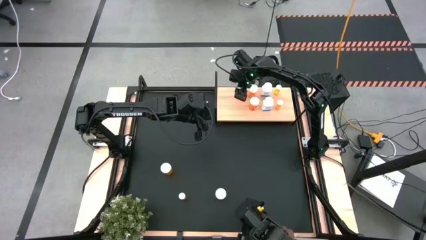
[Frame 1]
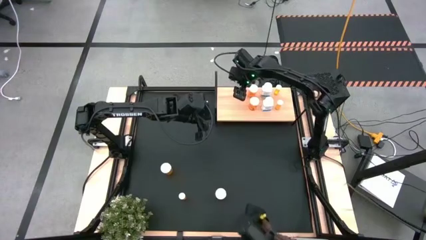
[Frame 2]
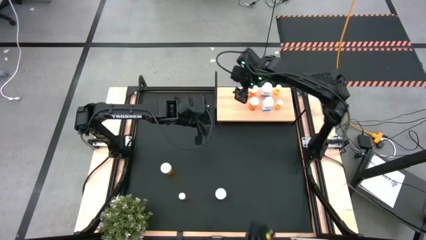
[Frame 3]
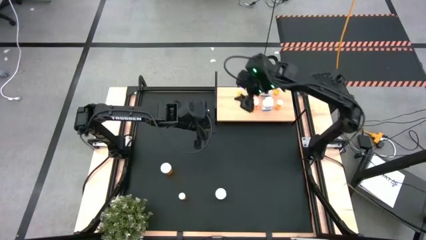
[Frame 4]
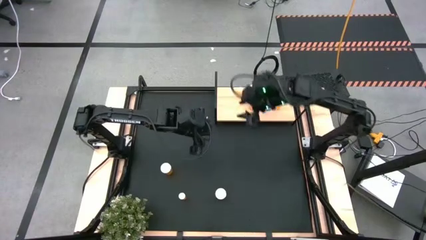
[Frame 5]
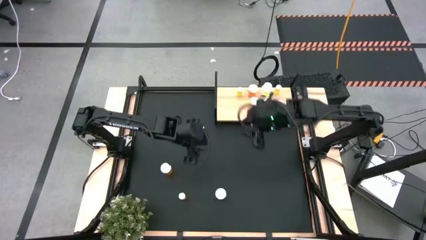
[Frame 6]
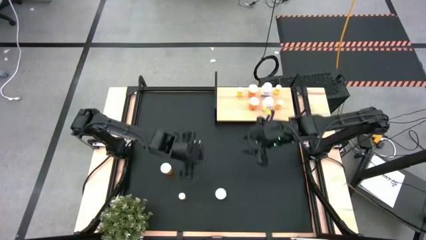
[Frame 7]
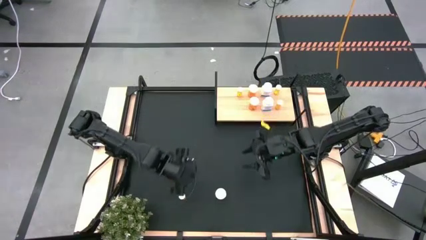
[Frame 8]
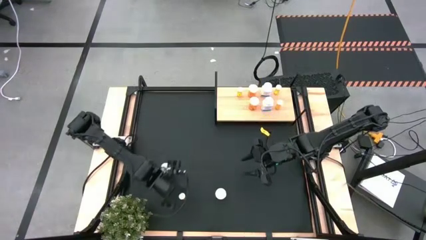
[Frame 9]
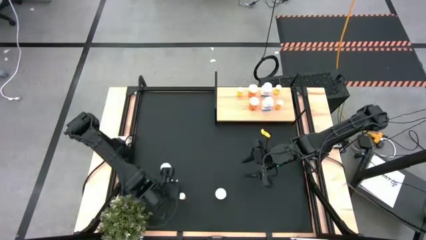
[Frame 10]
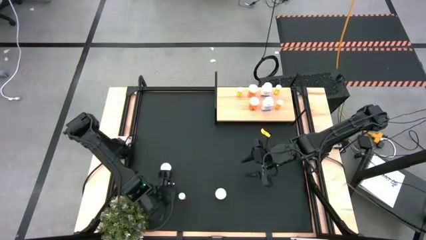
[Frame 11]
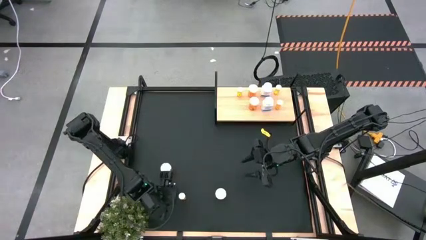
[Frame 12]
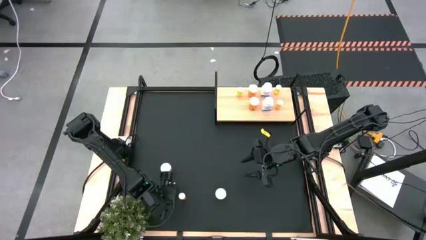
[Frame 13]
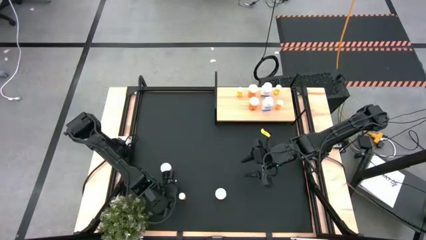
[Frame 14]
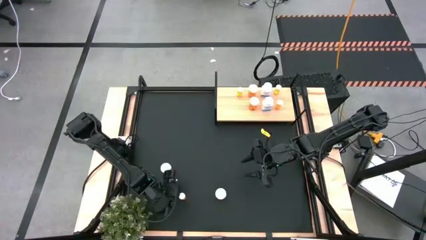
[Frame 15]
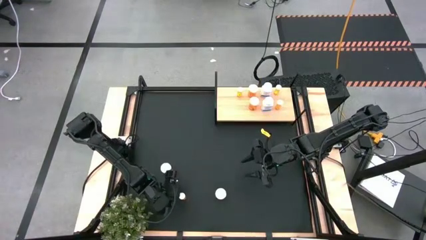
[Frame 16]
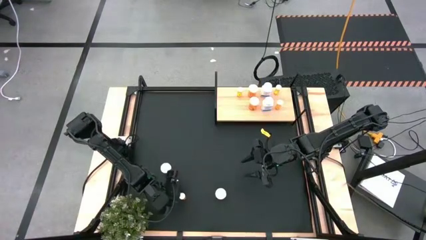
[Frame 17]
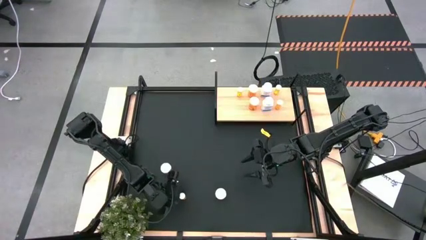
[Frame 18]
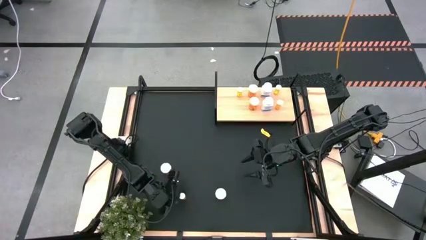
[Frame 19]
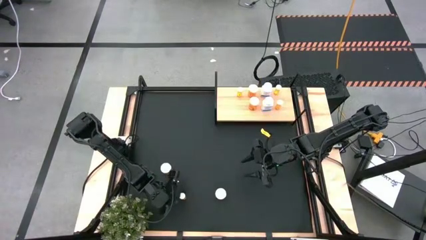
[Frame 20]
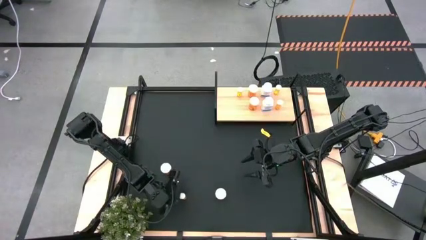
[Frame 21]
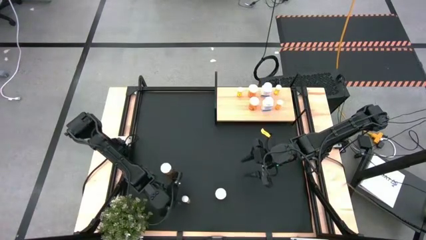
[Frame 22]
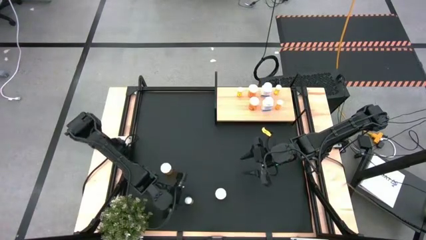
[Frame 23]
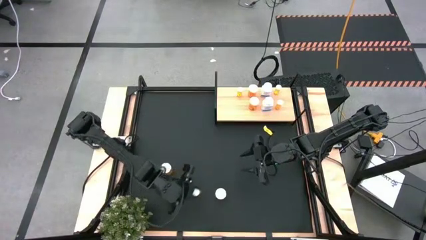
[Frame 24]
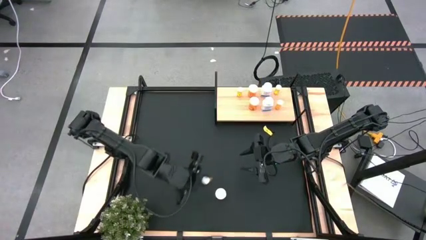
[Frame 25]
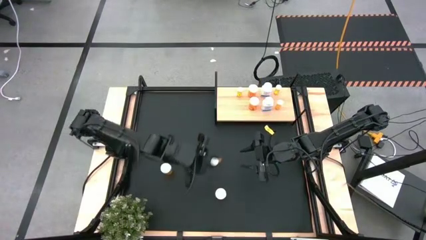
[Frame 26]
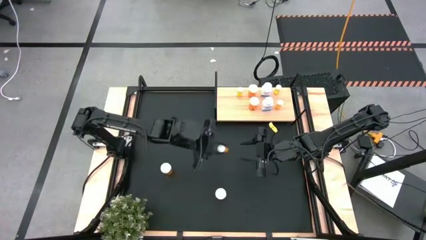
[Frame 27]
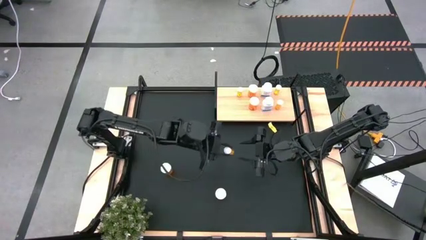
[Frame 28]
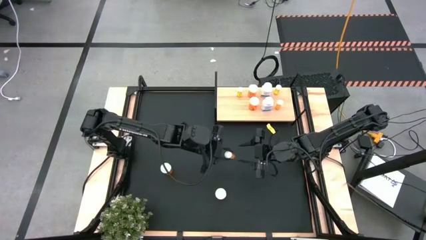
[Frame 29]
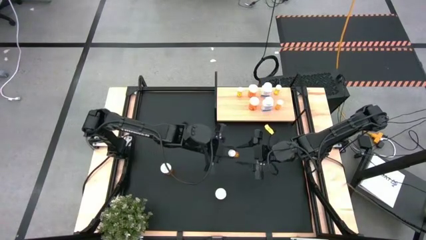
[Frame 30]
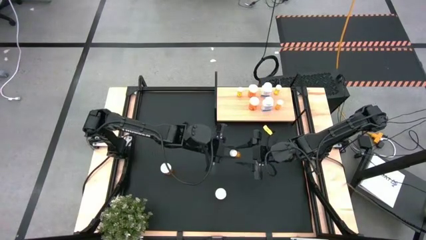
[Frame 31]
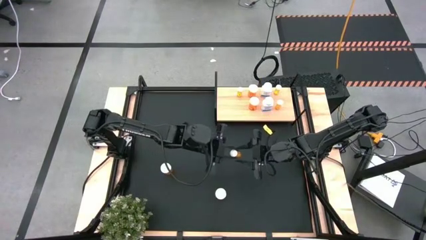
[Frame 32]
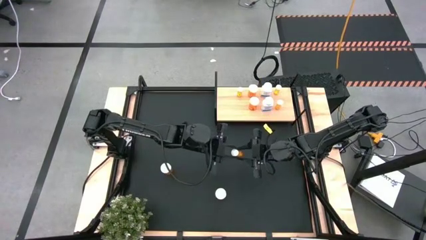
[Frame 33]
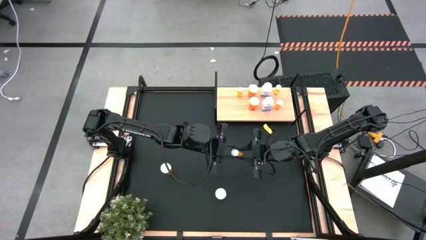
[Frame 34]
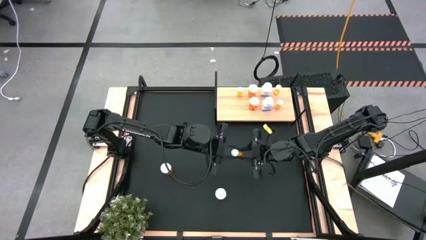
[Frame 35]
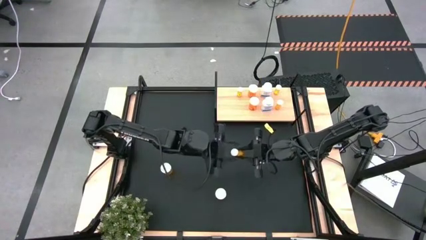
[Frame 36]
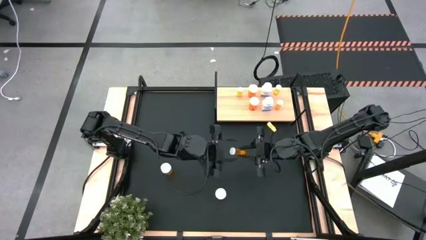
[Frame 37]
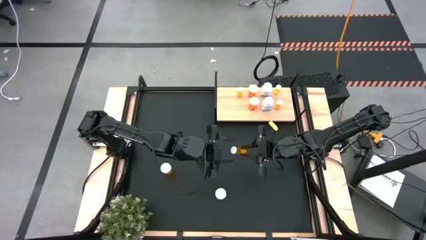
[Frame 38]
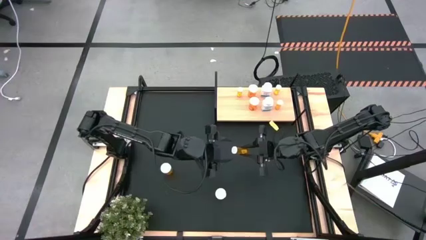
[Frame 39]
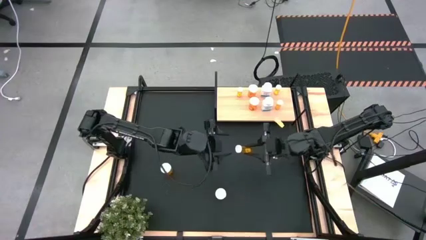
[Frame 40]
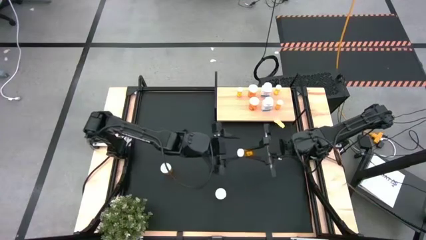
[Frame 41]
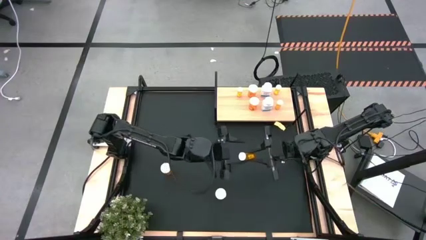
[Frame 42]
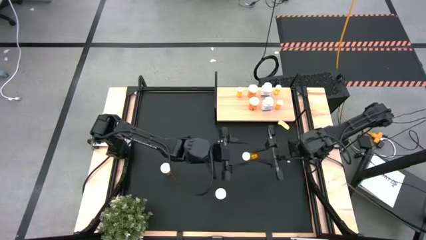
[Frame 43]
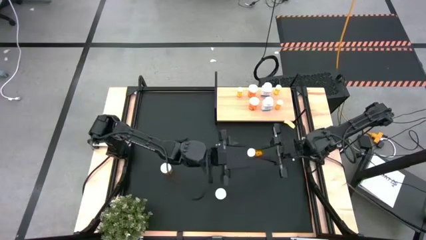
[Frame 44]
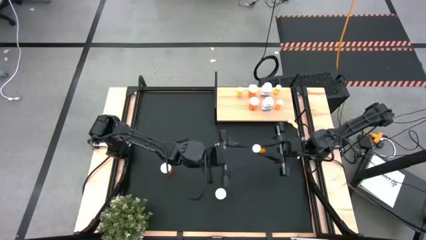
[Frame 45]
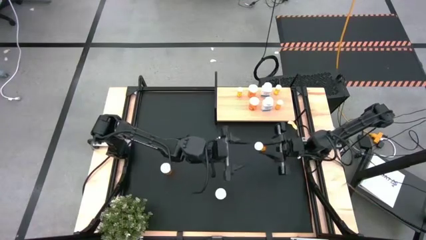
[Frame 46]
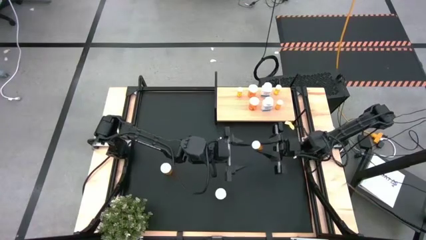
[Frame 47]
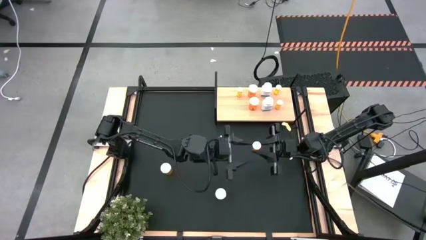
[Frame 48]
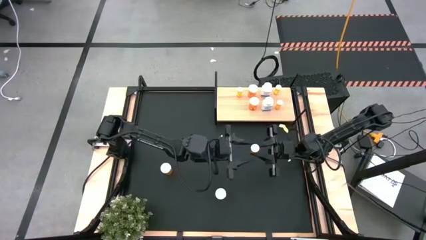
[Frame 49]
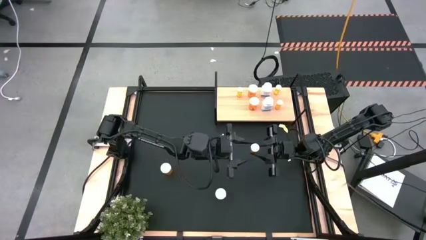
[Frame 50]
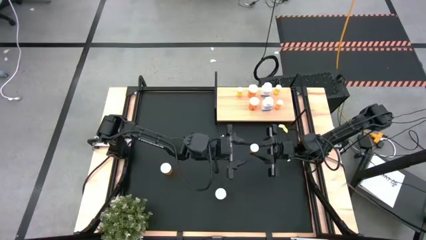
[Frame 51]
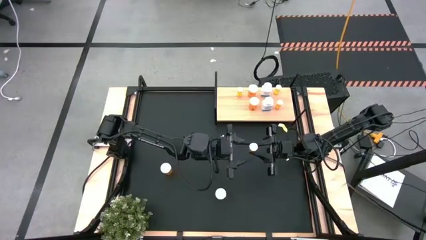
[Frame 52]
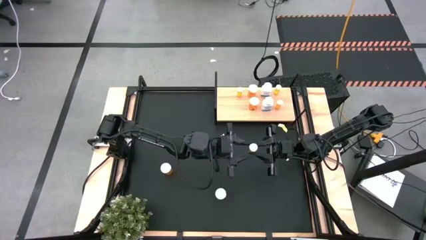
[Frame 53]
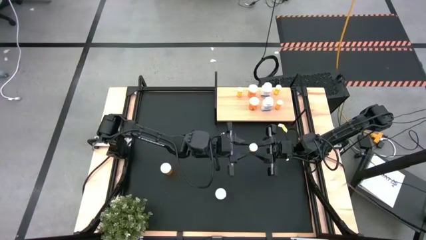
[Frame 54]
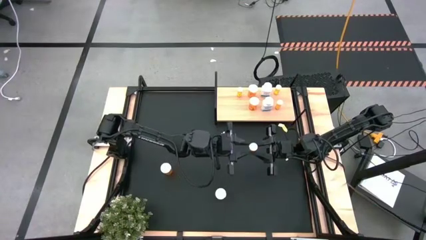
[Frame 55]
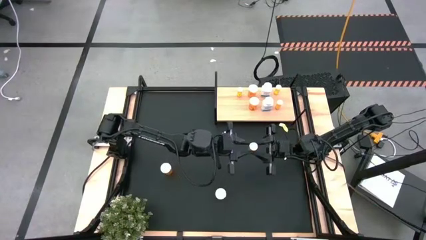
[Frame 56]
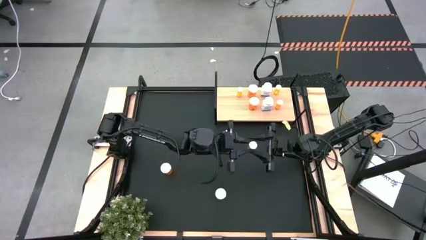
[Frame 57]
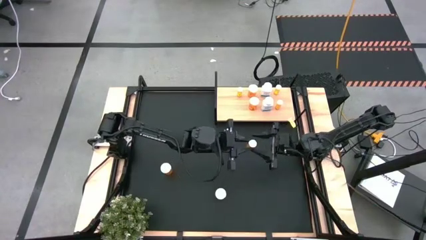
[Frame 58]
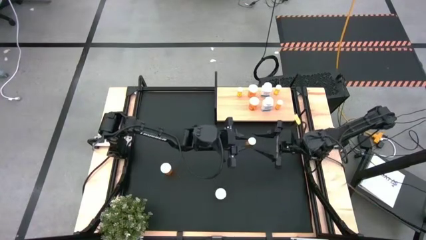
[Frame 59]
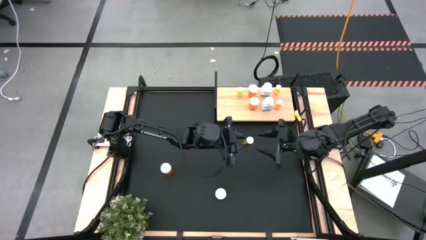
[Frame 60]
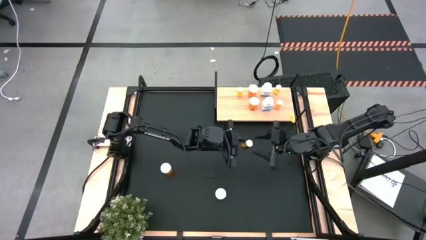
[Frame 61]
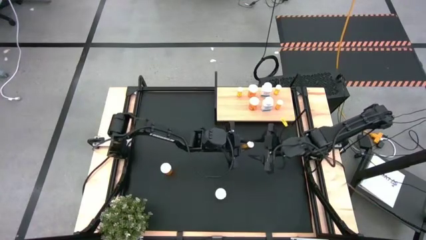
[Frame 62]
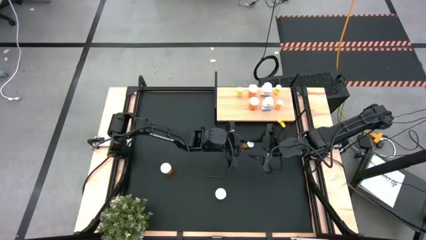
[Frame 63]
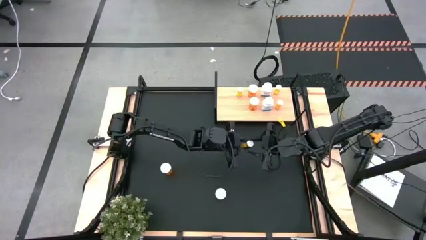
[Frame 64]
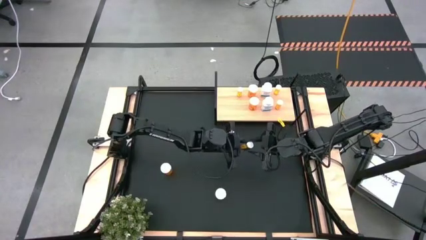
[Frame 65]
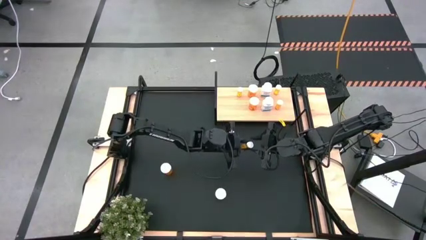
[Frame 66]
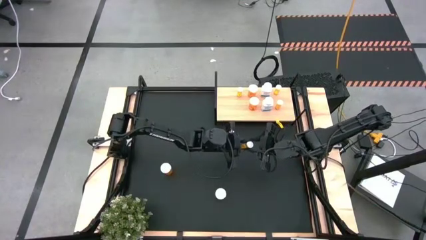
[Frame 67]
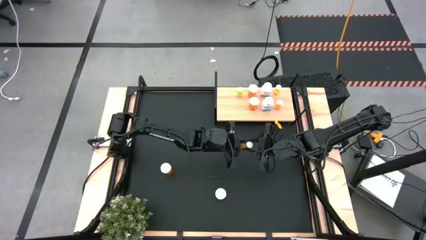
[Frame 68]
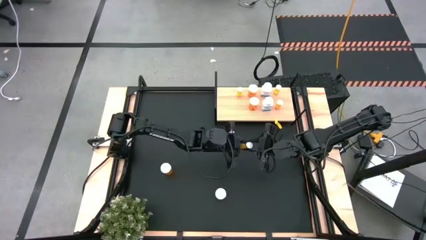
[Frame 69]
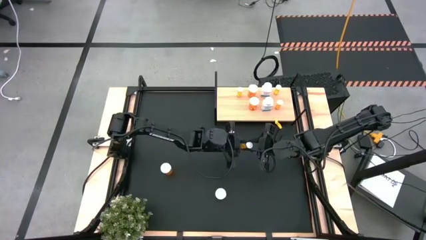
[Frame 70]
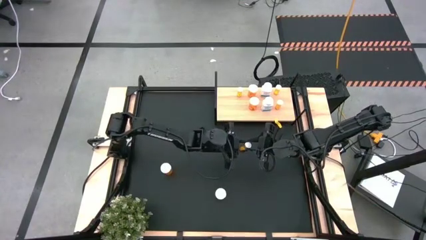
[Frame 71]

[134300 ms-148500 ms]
Task: Pick and place medicine bottles onto shelf by color
Put the small orange pill bottle on the shelf aligned with the other small orange pill bottle

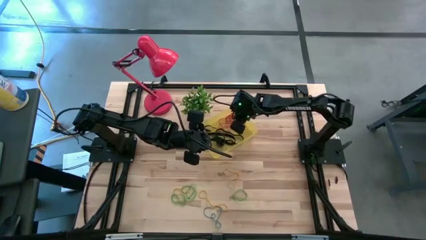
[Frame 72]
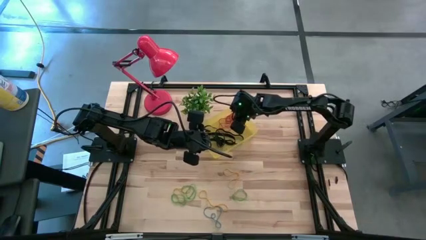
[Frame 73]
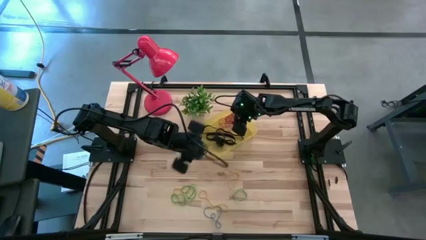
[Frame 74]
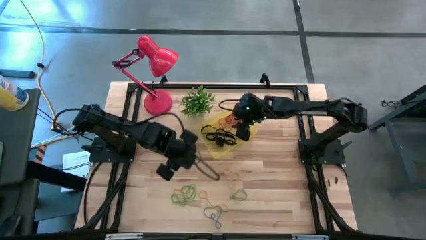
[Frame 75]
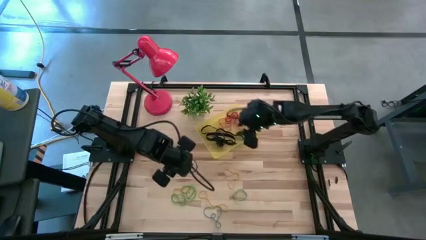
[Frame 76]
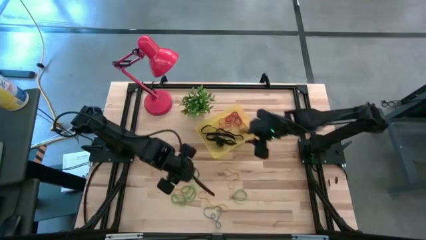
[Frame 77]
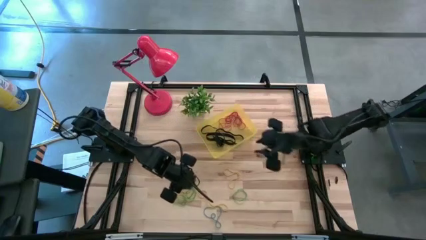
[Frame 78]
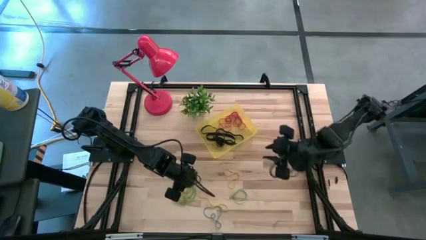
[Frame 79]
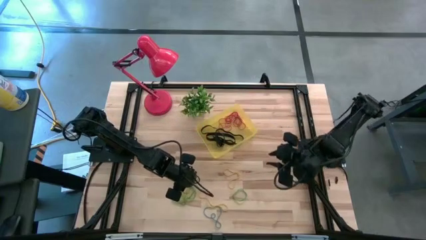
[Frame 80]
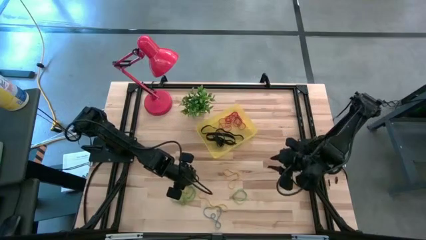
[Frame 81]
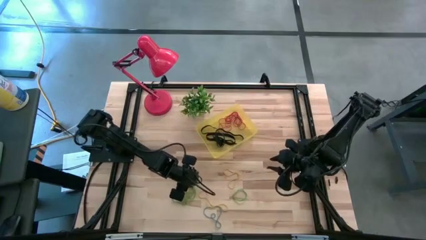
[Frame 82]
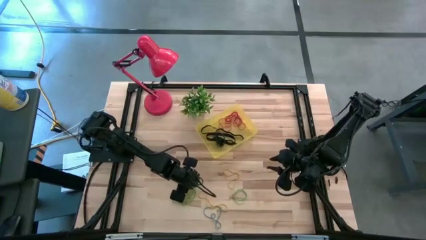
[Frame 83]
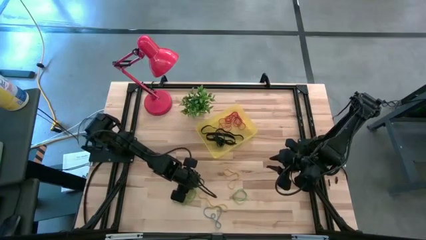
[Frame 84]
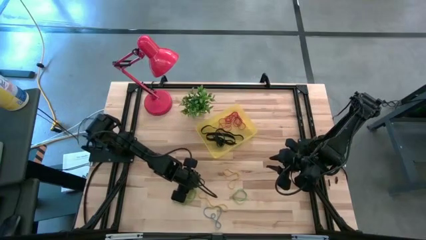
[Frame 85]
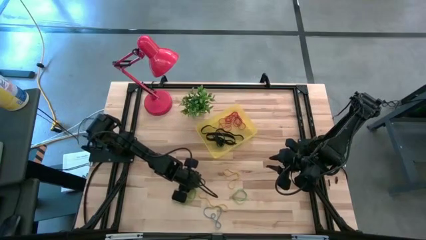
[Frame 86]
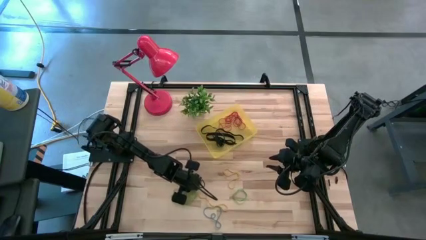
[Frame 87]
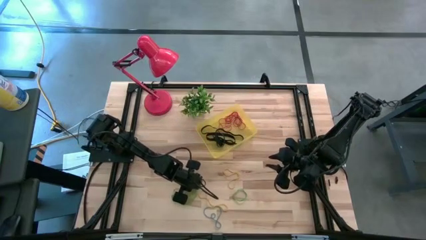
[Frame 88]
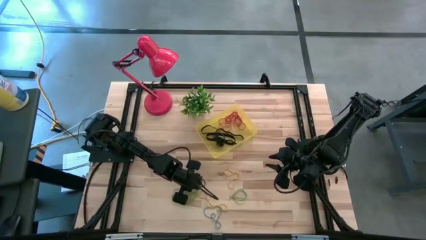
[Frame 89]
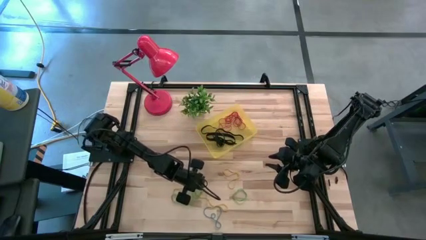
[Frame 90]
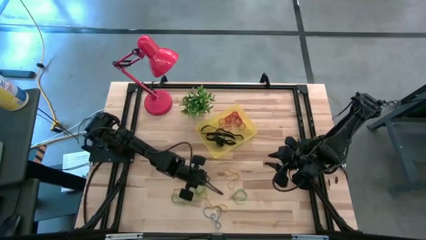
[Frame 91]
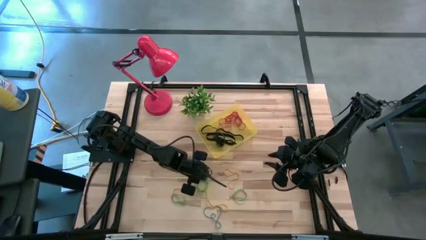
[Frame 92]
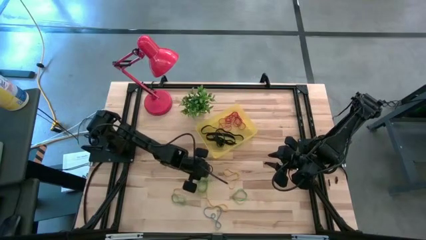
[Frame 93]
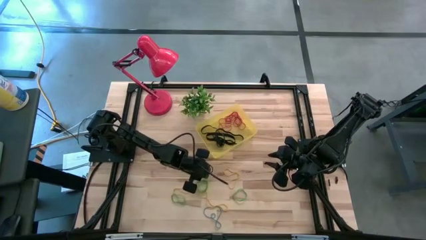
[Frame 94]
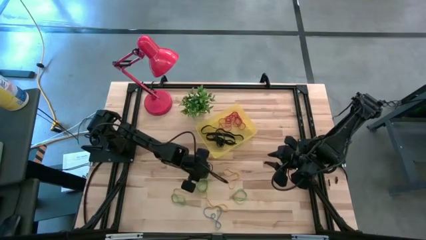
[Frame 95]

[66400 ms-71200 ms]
Task: Pick and place rubber bands into bin
Put the green rubber band into the transparent yellow bin
